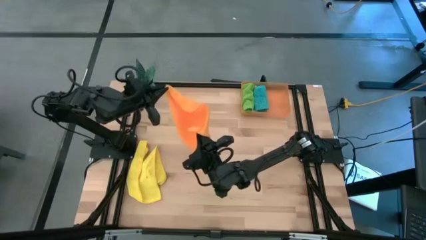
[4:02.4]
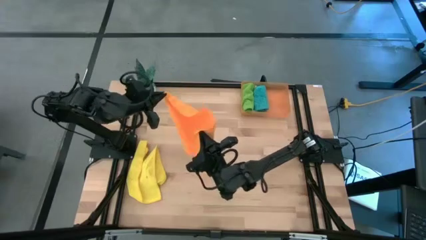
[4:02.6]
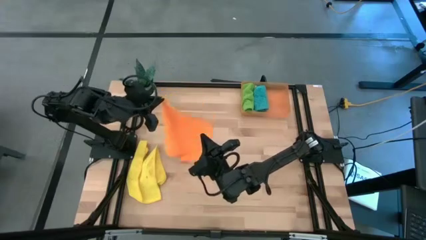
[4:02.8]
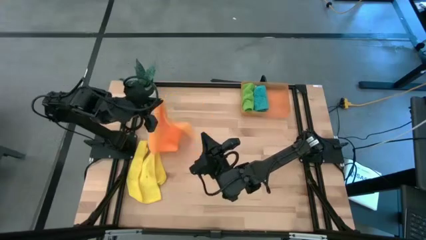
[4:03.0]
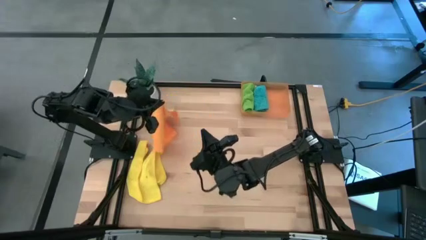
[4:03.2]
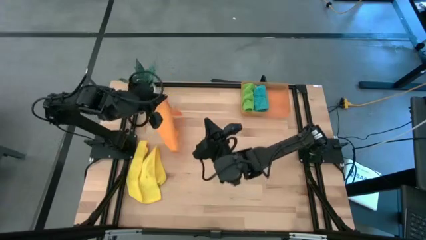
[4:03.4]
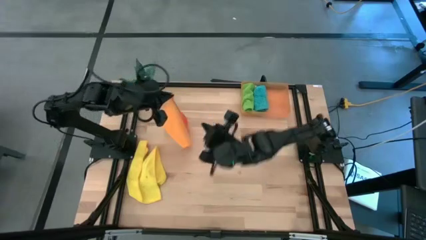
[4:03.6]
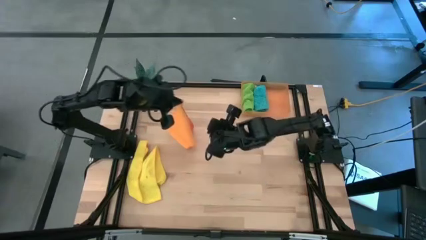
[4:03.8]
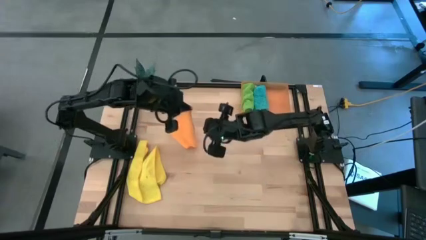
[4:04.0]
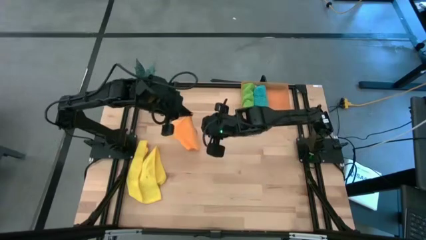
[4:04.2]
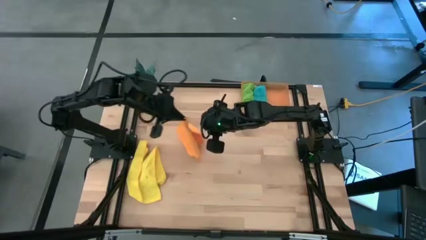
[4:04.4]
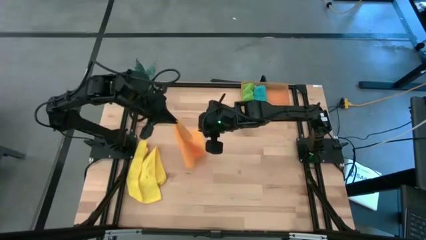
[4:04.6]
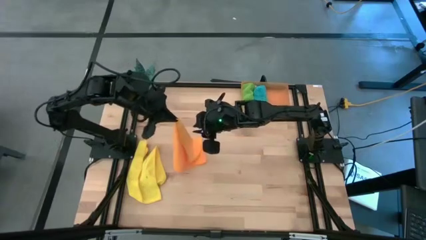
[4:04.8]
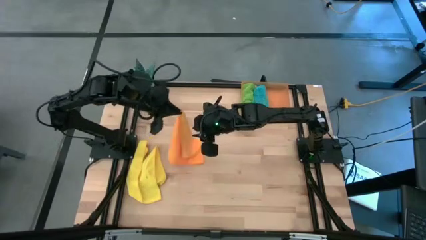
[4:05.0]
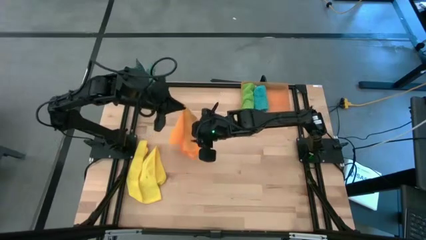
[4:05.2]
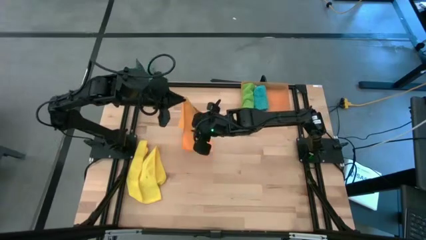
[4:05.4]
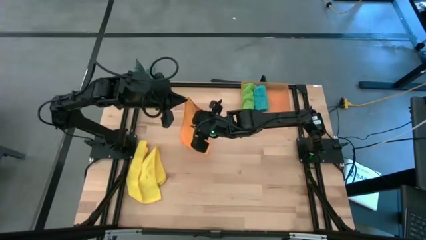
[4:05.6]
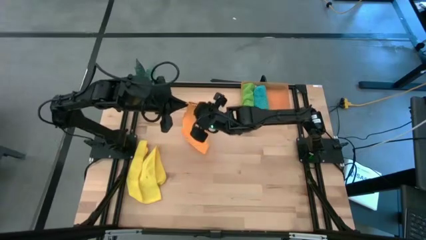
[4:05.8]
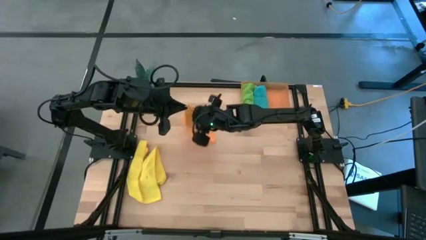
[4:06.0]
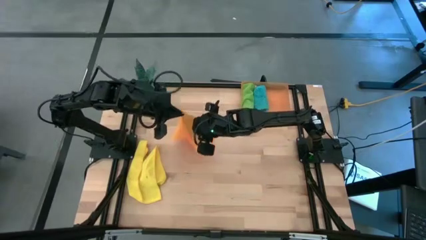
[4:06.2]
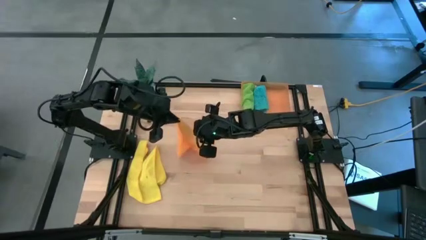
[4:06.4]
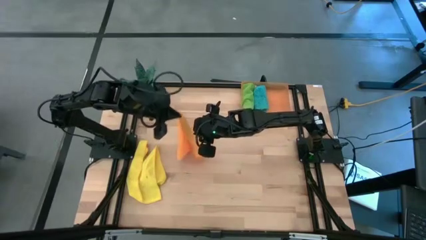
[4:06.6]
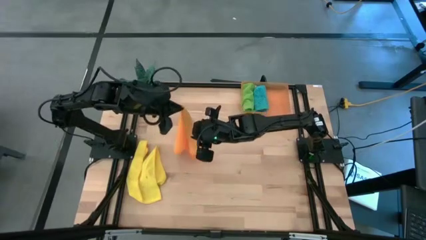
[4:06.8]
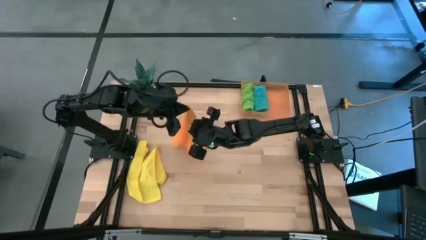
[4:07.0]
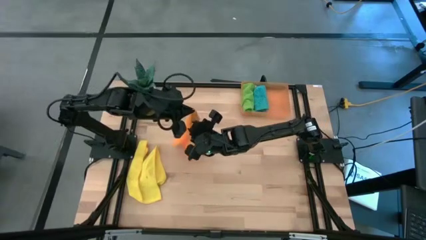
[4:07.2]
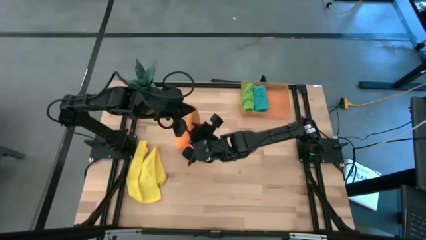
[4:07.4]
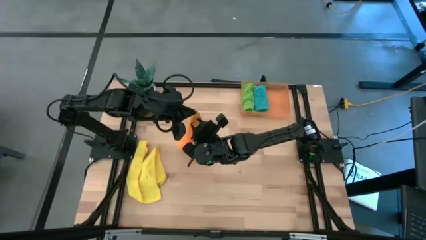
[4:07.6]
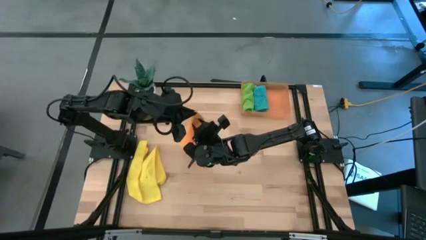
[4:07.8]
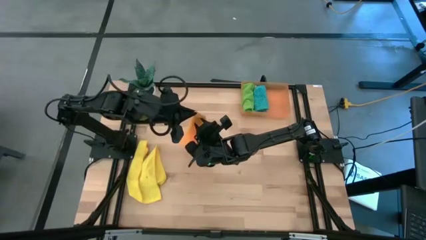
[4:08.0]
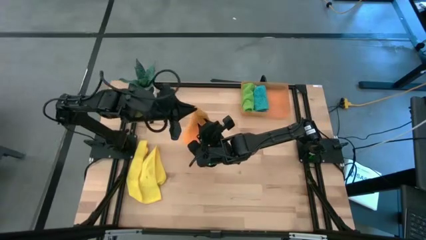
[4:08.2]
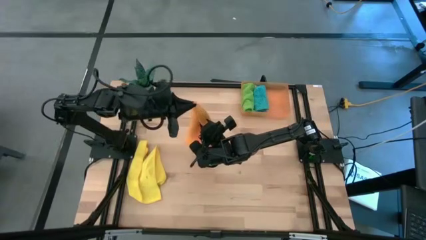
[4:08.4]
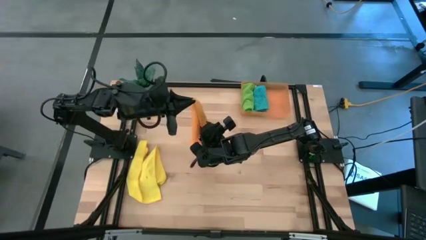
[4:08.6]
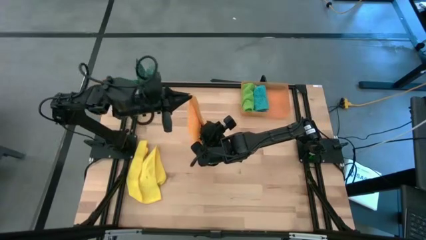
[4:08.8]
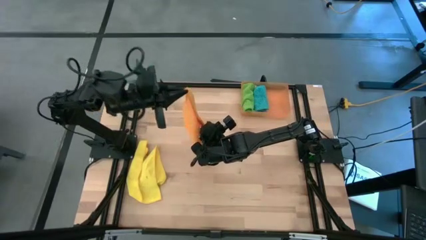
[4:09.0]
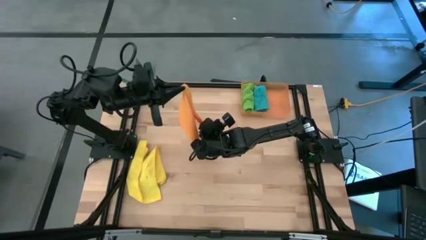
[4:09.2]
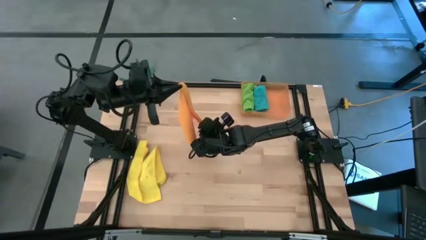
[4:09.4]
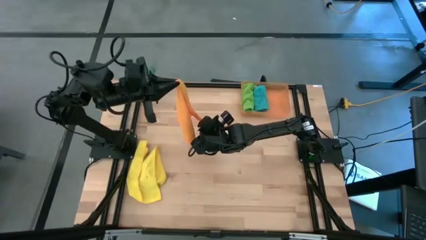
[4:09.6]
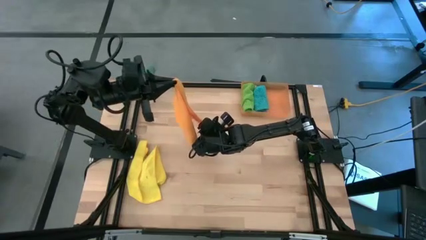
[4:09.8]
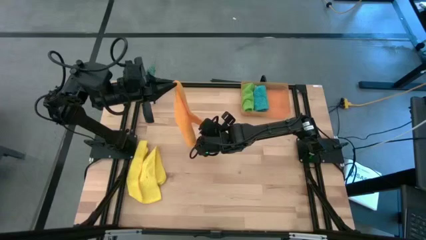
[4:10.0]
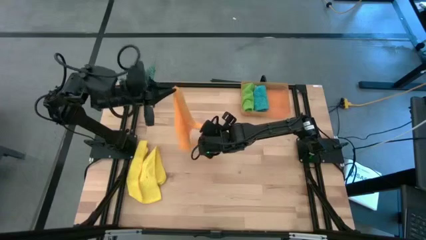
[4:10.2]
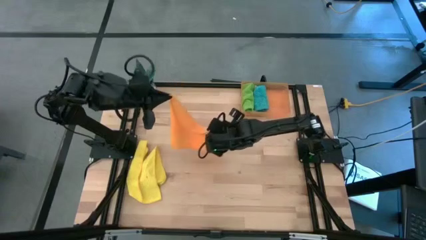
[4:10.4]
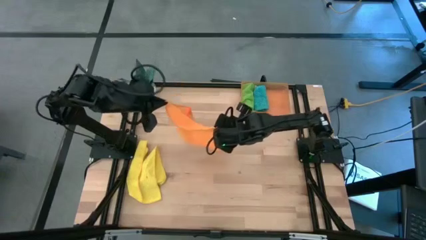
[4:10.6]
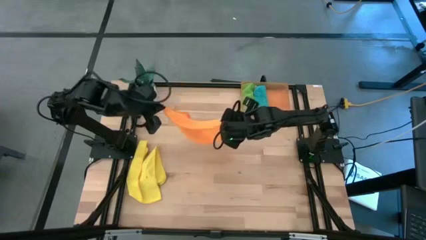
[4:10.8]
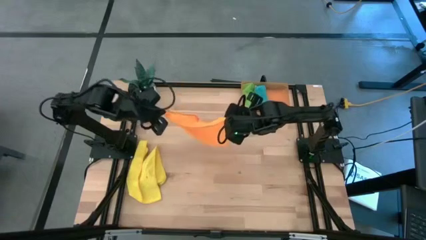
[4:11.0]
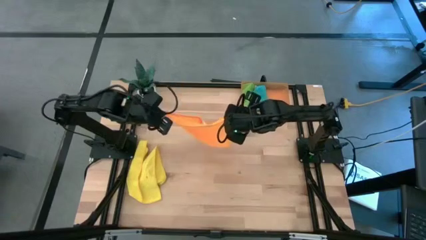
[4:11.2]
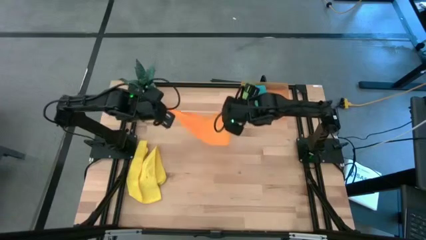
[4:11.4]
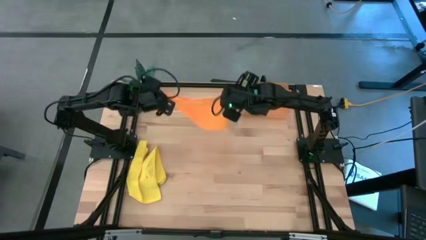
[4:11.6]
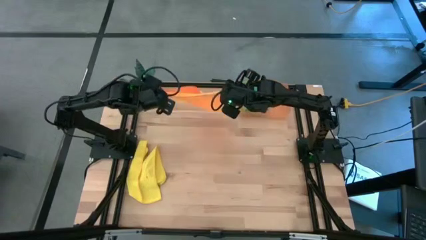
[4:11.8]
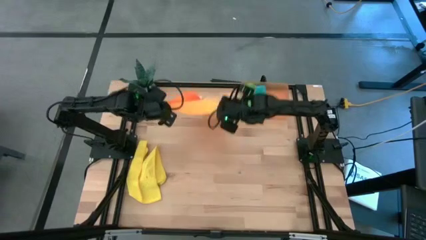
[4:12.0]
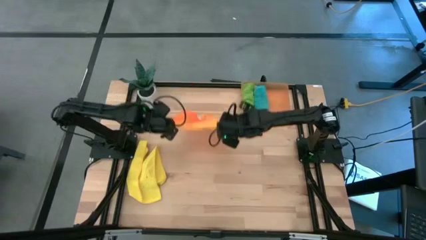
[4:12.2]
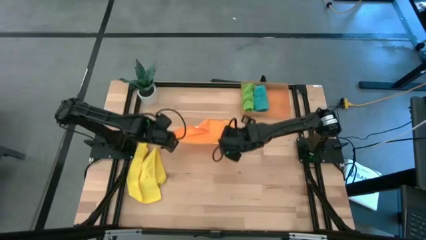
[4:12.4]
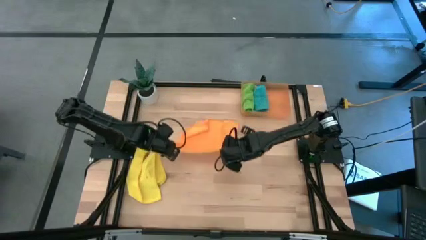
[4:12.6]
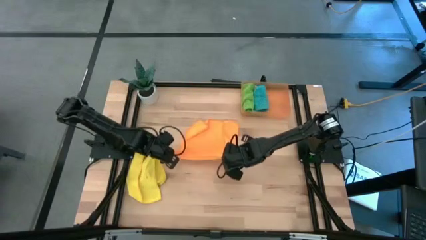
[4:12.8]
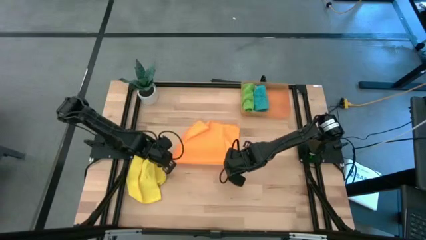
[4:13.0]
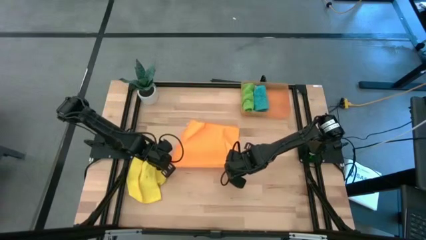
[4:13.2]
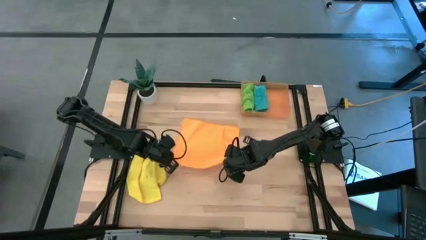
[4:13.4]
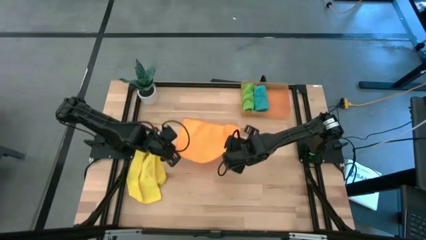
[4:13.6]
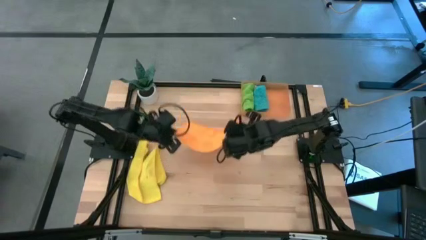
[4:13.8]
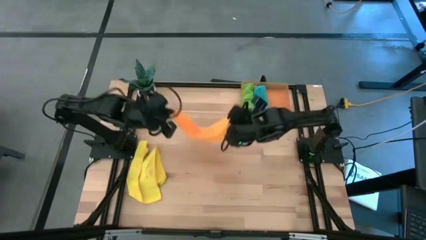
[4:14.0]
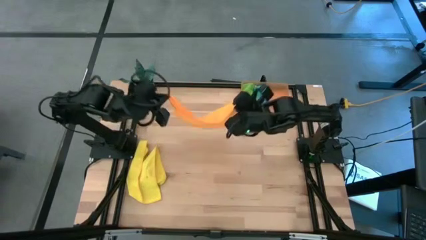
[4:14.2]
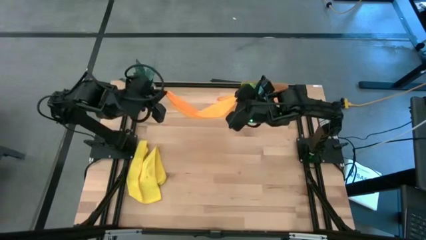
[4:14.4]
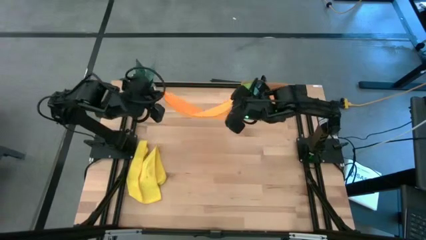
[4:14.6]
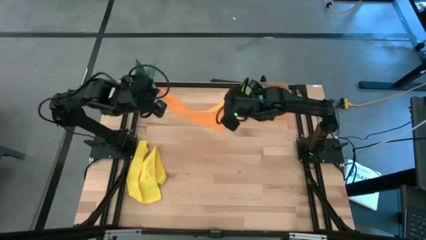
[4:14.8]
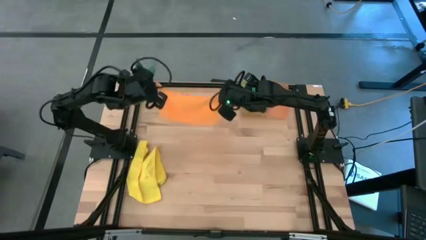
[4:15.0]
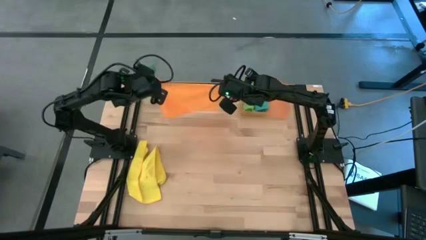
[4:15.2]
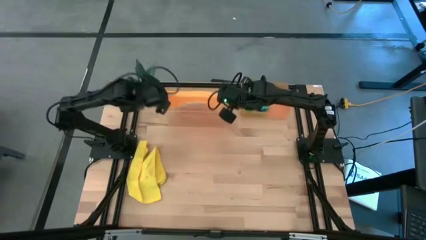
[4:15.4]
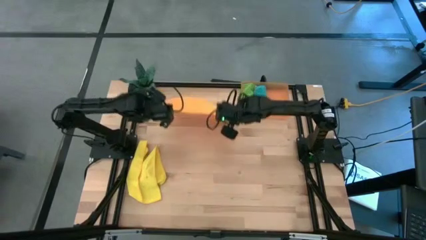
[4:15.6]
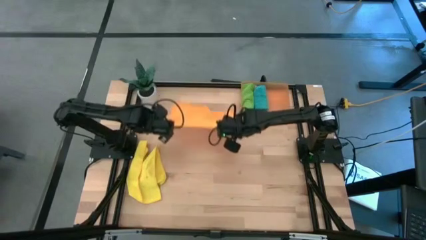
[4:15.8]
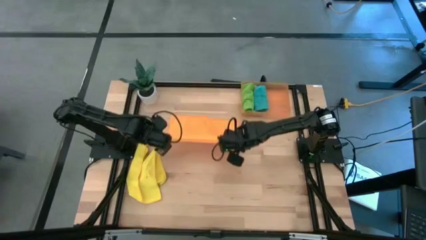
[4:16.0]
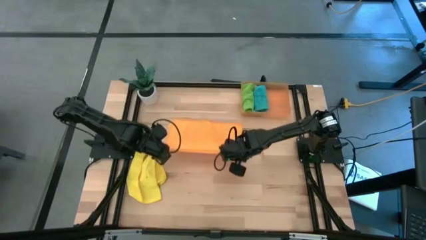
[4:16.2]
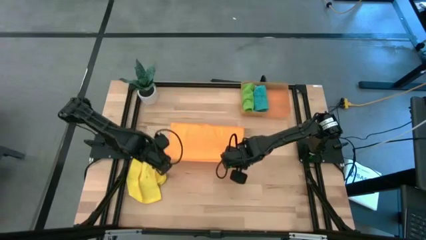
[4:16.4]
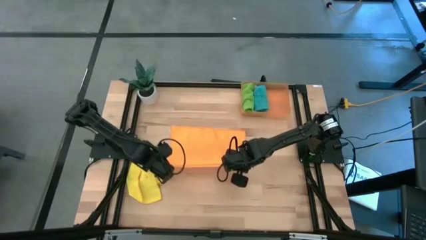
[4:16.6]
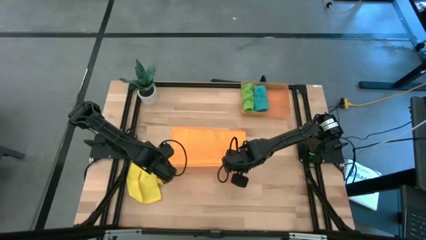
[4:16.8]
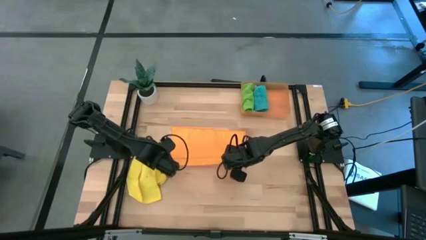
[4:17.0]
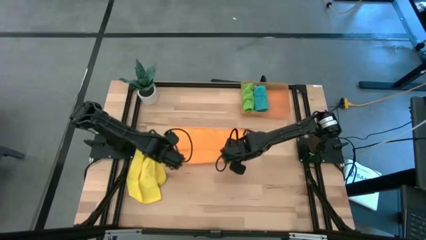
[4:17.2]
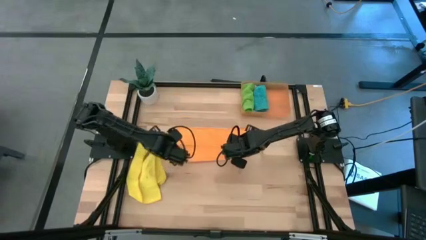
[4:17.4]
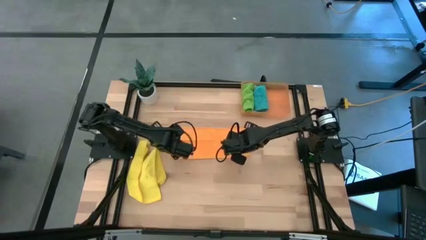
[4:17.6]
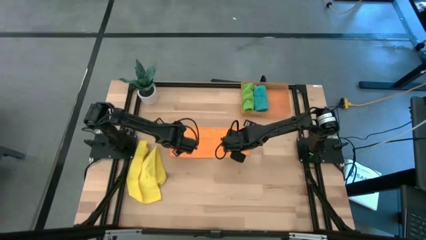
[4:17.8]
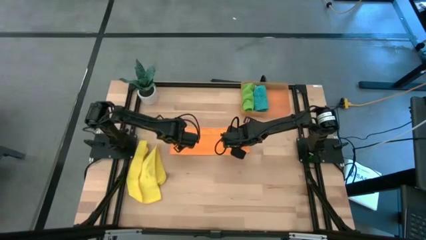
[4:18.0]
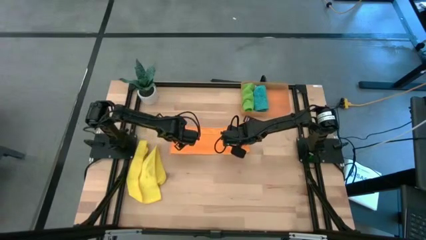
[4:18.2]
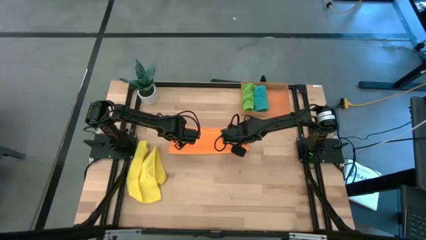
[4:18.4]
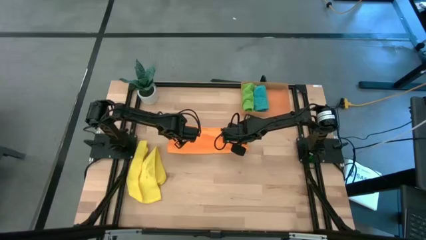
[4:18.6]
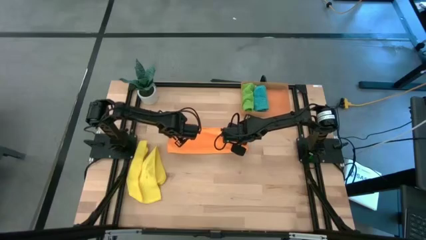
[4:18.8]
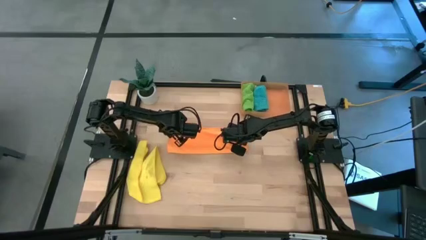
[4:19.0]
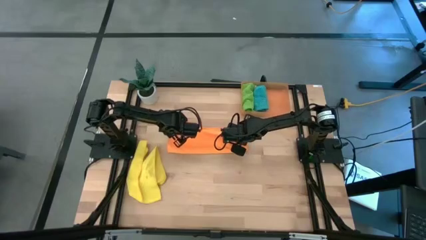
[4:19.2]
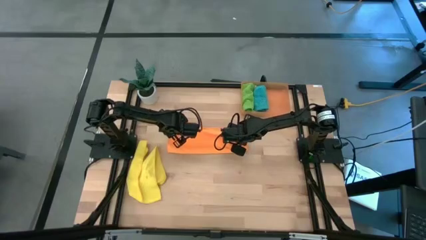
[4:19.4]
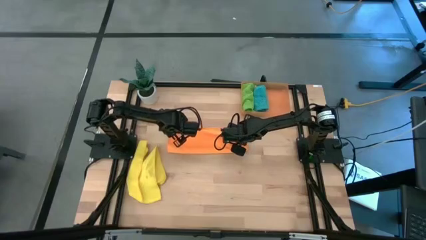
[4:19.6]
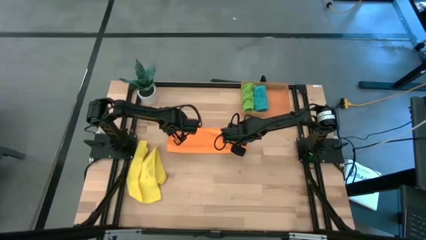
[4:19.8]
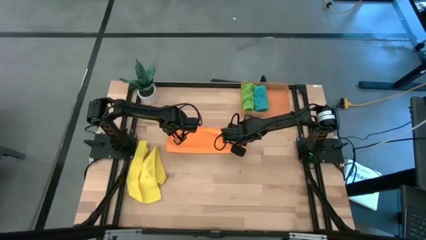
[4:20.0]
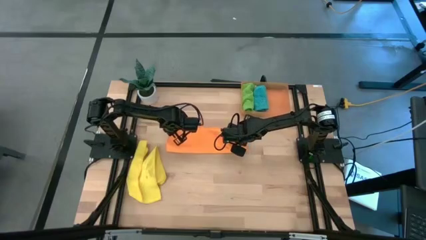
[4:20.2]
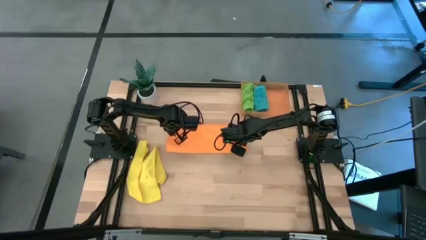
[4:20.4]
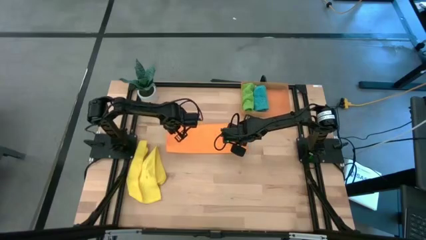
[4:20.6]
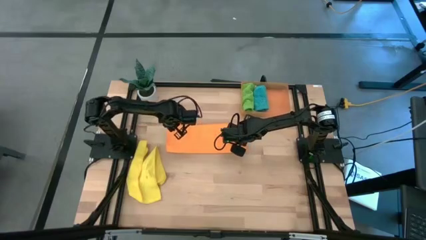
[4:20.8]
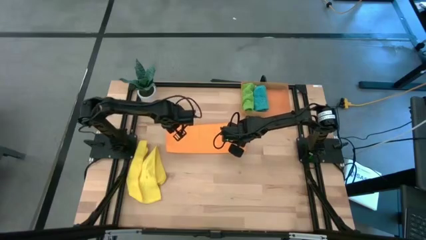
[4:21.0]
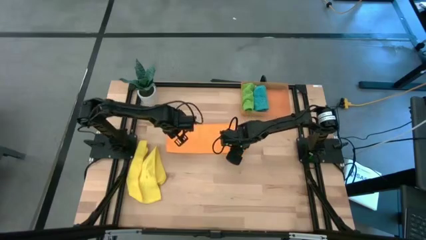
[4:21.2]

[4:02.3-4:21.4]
Task: Roll microfiber towels into tight, uniform cylinder then place into a basket
Fold the orange towel
